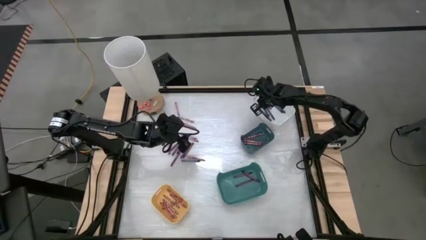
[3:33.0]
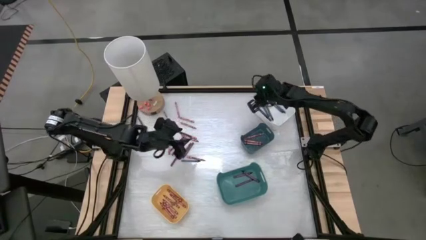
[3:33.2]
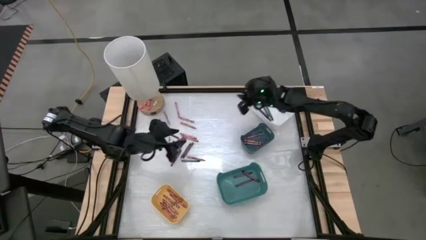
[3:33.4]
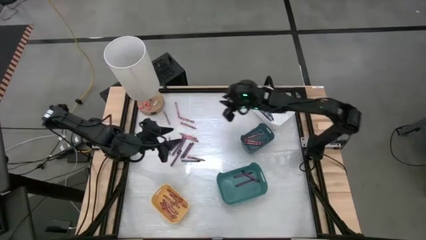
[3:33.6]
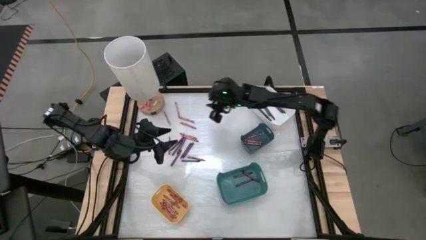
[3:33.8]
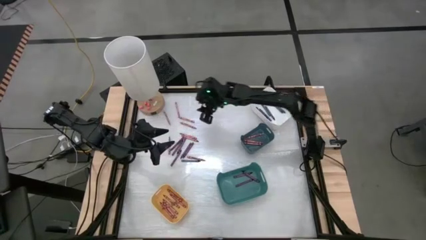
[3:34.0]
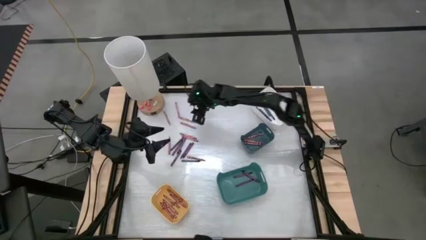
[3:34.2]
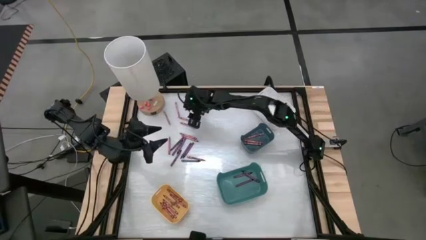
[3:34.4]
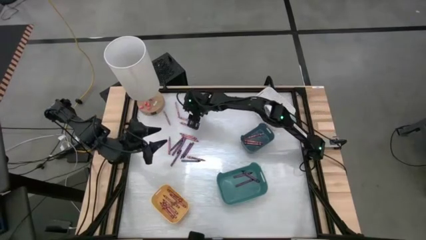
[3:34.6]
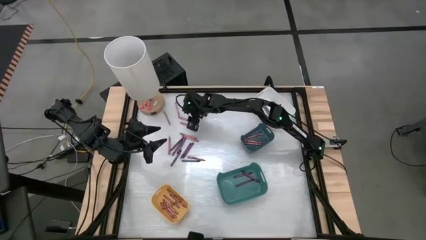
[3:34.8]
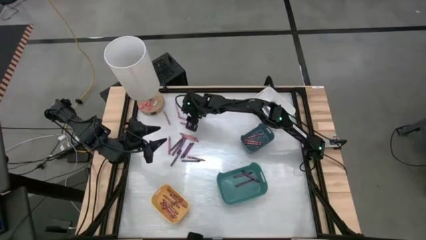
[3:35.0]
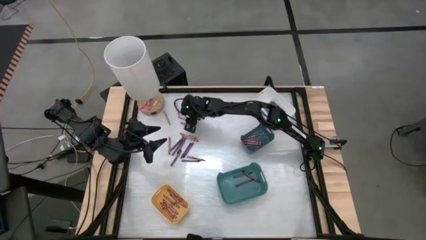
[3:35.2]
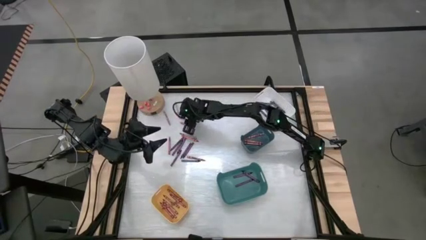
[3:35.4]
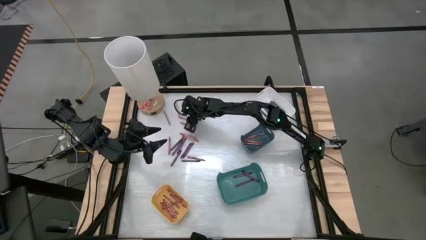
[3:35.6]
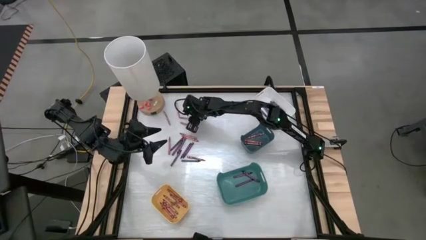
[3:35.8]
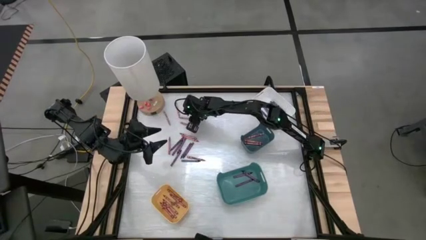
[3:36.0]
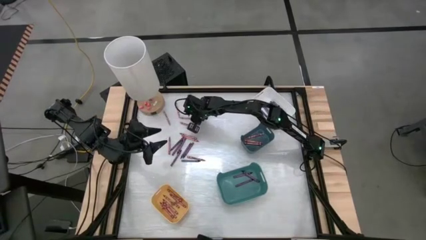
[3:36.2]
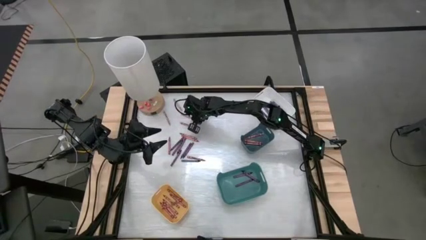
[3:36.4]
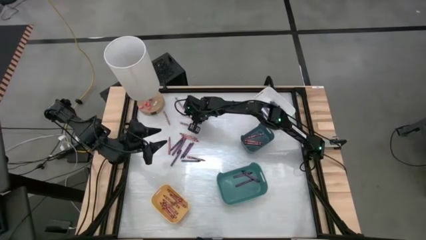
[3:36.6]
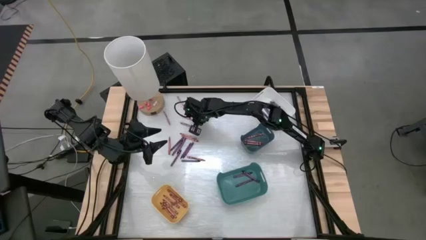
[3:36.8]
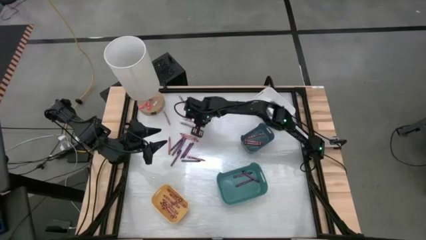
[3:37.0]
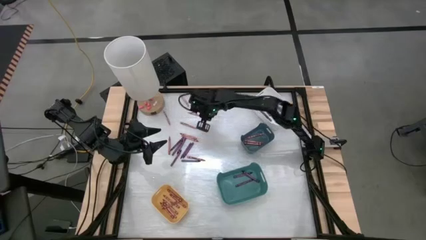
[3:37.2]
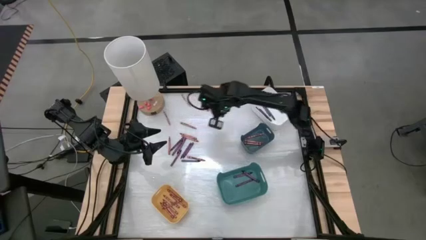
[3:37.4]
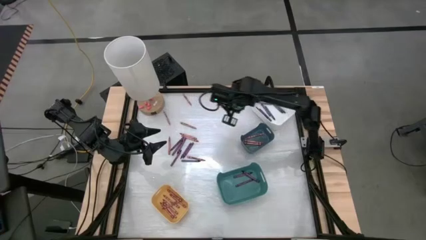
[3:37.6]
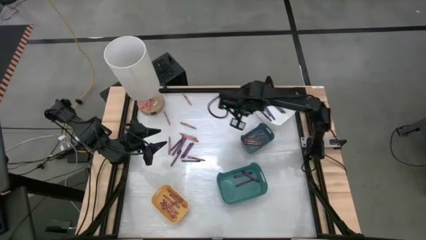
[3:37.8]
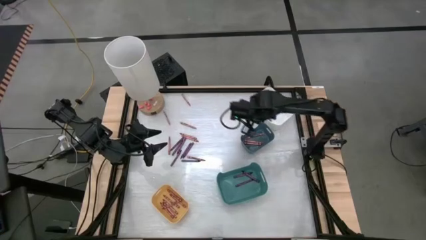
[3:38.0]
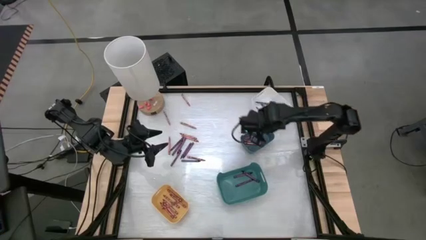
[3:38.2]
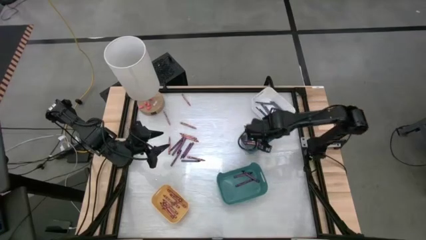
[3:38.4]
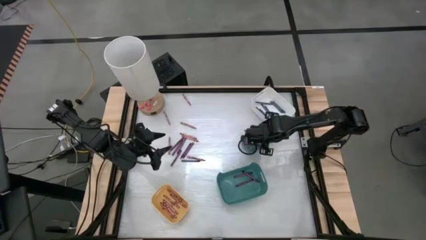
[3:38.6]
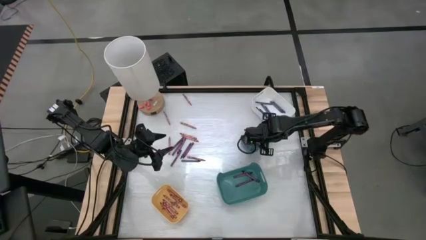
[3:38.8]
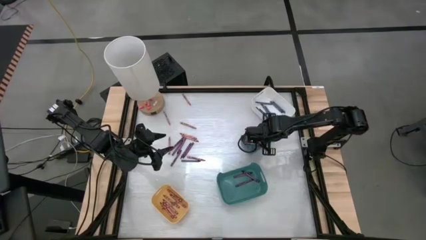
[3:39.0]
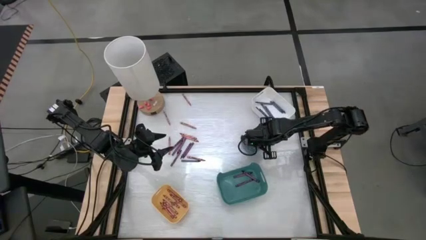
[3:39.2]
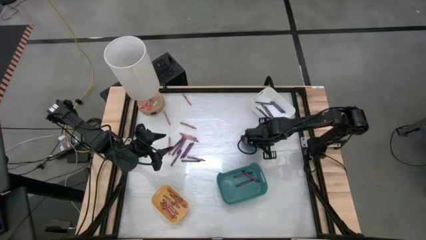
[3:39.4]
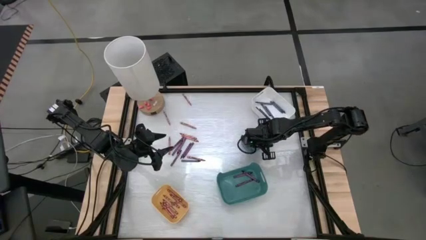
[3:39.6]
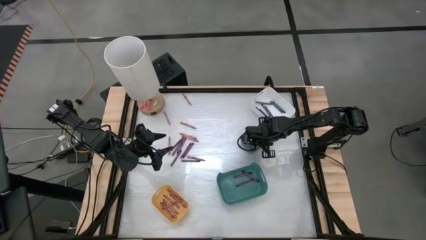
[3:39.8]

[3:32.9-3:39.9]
Task: Sort crayons
Put the pink crayon into the dark blue bin

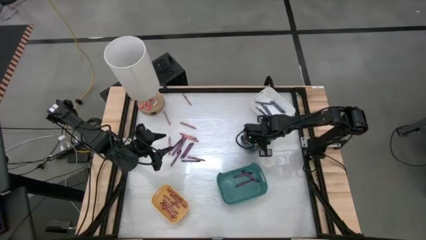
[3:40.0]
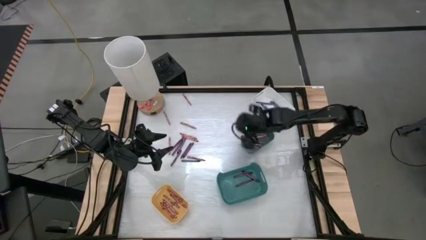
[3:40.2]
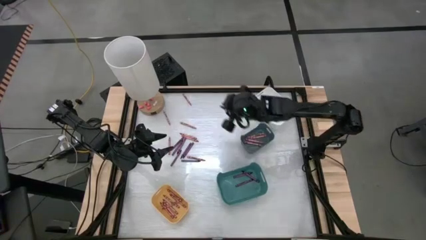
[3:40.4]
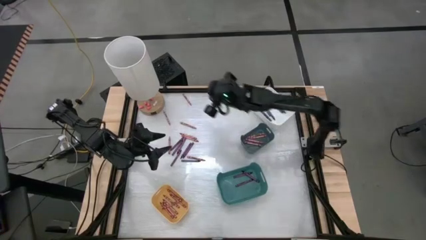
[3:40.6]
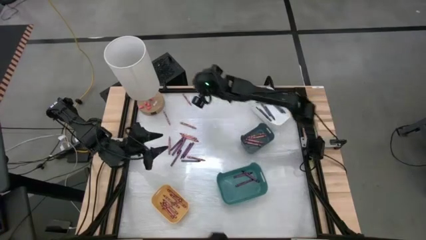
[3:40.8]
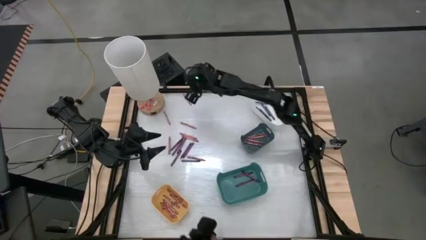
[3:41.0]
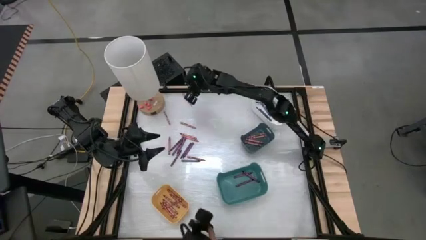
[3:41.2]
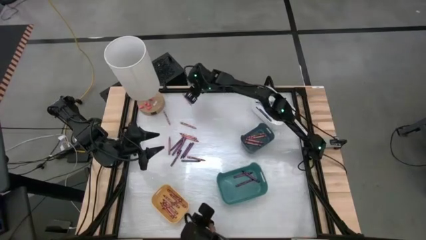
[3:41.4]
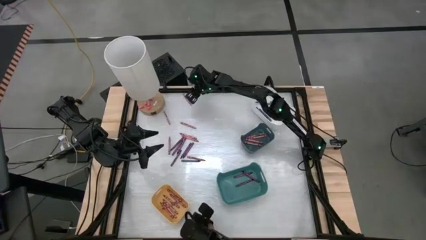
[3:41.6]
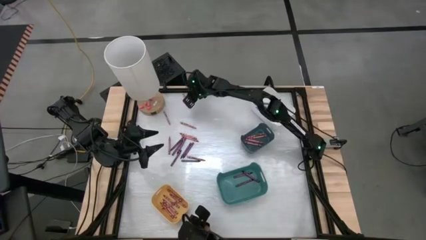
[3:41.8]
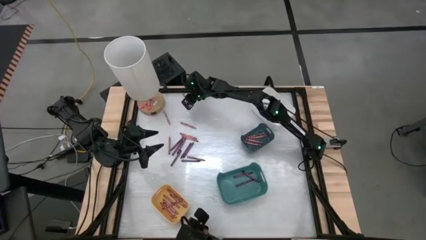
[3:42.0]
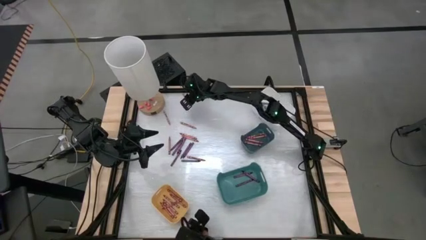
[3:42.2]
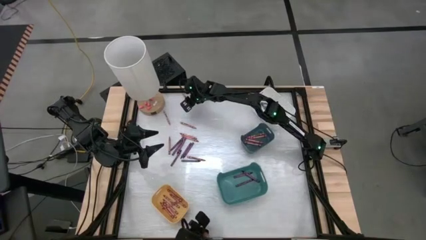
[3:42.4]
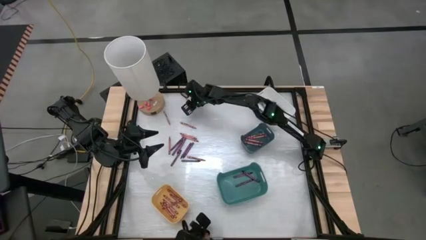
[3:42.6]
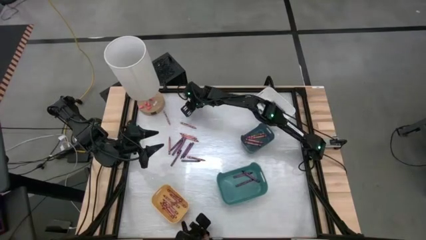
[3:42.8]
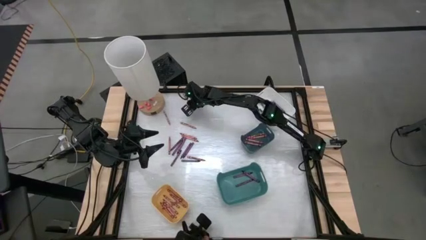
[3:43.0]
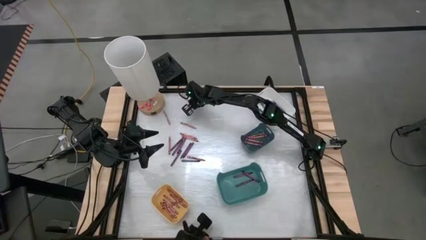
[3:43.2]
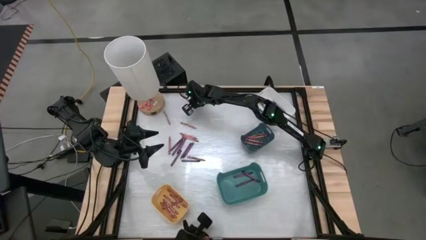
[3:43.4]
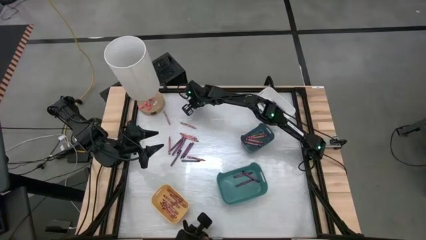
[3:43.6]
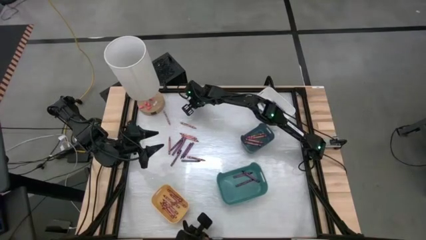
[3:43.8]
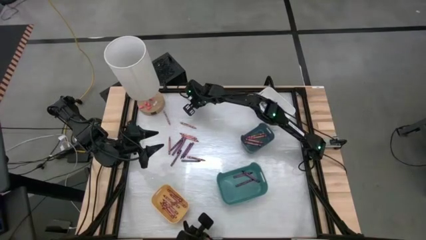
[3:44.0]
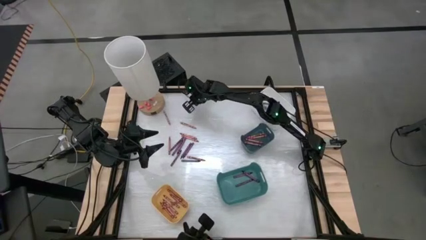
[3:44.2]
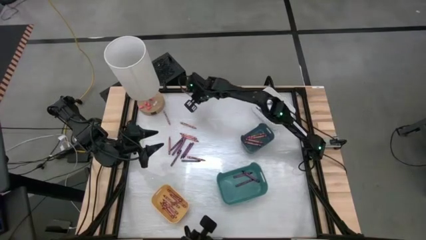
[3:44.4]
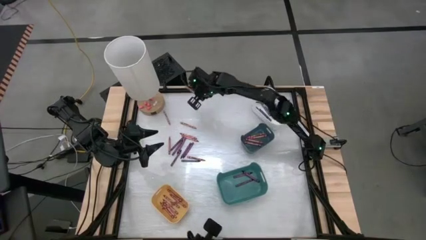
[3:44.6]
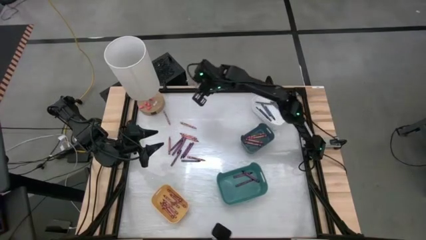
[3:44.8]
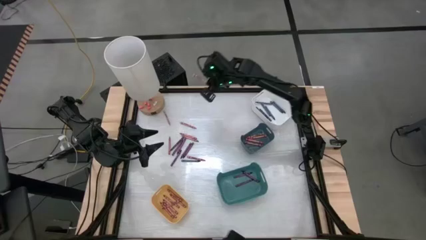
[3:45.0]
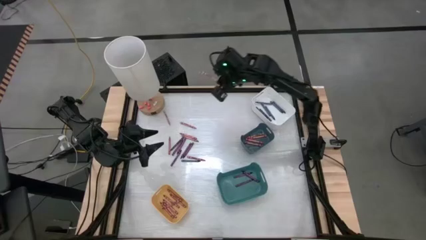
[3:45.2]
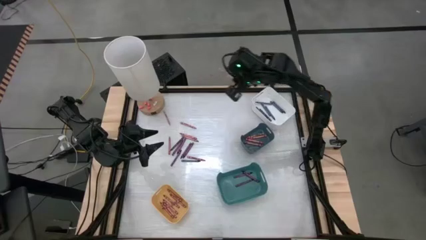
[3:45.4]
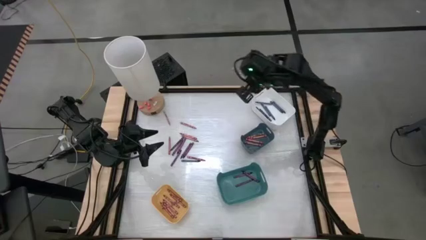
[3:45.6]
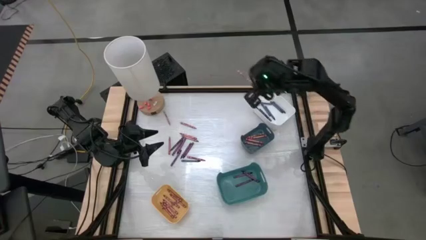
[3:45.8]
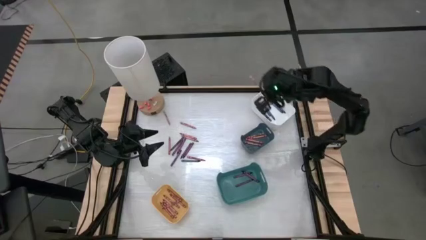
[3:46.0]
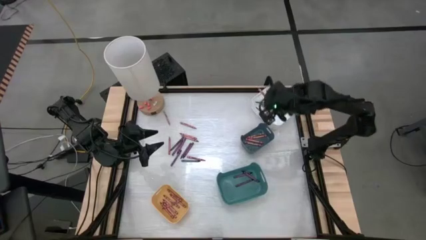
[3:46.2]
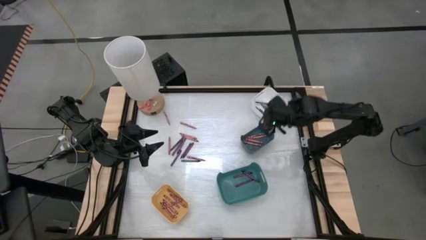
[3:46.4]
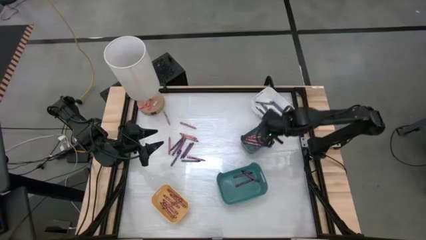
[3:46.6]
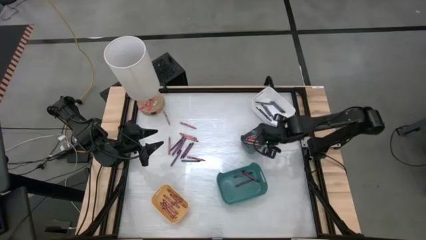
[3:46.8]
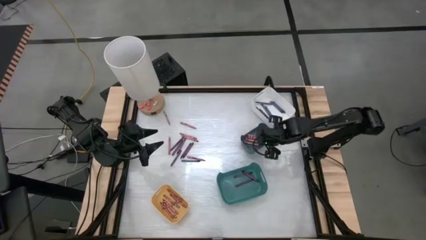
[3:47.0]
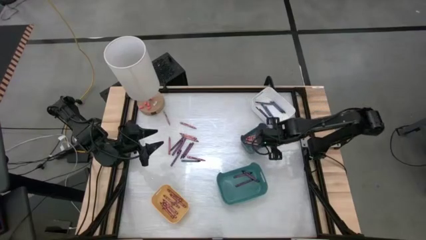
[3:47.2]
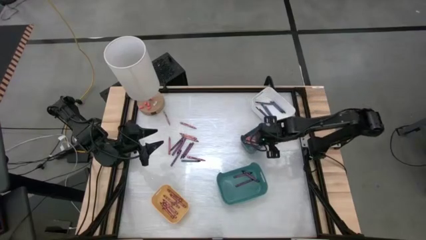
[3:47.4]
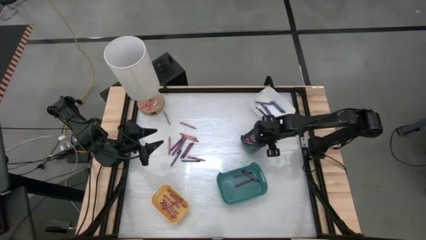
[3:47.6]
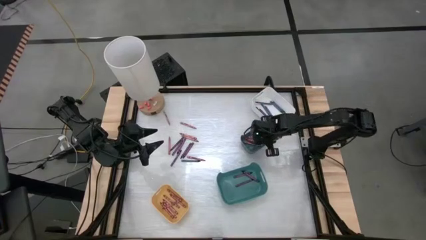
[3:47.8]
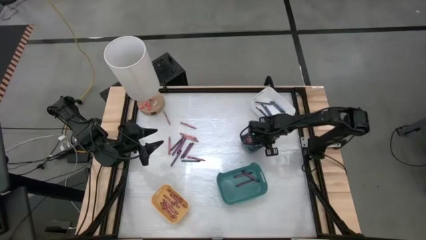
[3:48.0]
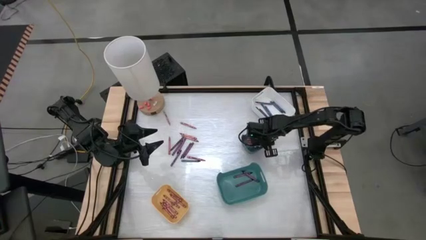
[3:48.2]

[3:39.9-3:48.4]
Put the pink crayon into the dark blue bin

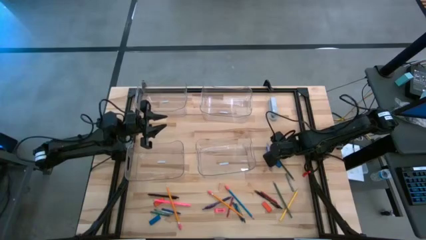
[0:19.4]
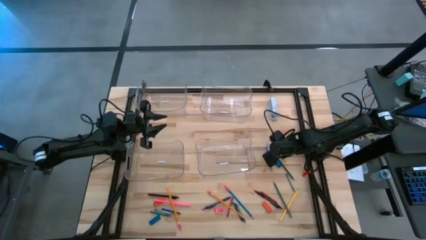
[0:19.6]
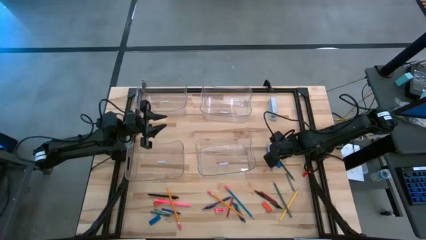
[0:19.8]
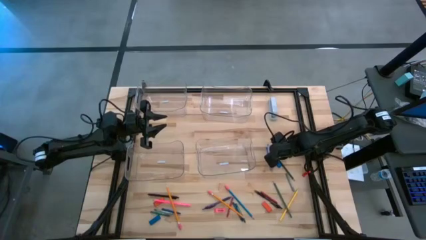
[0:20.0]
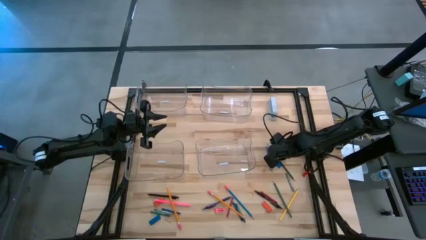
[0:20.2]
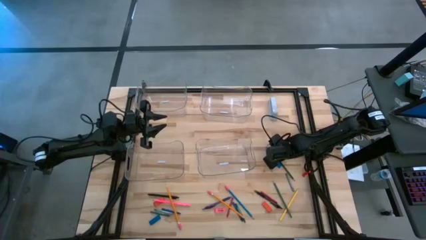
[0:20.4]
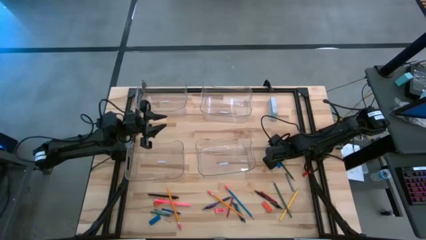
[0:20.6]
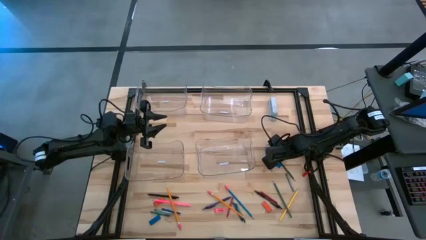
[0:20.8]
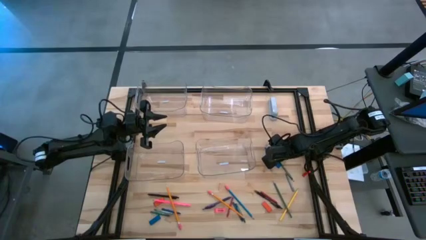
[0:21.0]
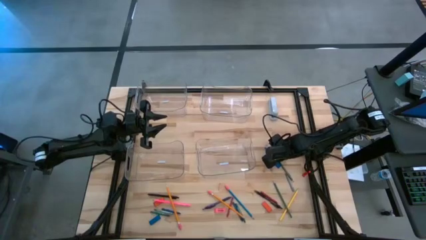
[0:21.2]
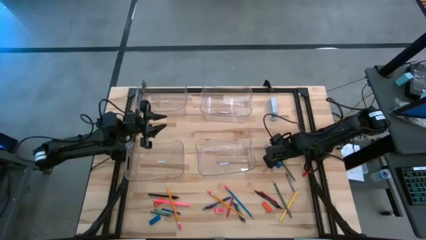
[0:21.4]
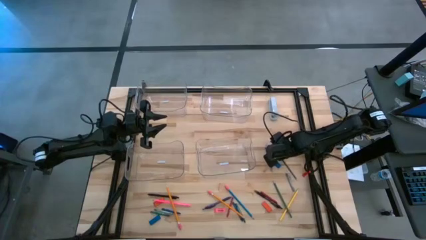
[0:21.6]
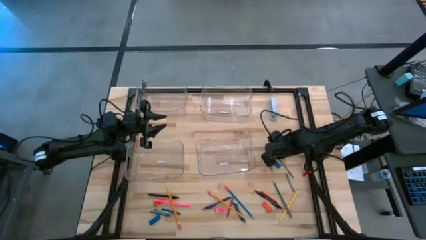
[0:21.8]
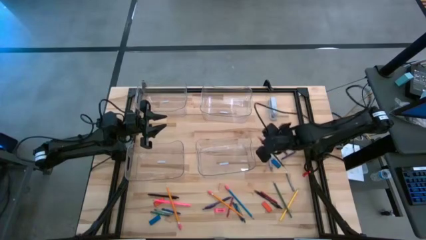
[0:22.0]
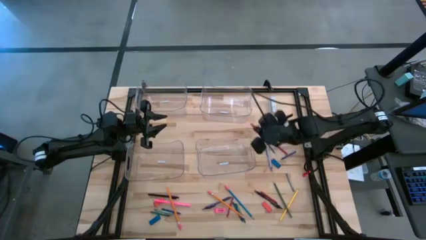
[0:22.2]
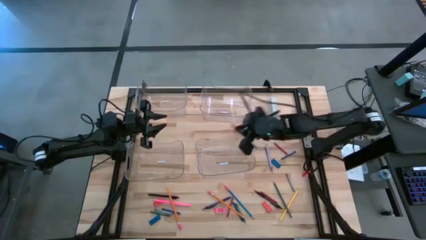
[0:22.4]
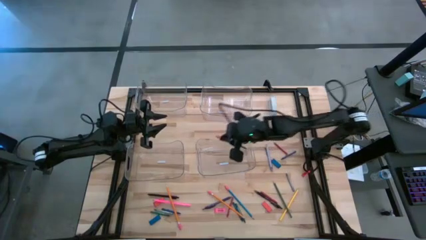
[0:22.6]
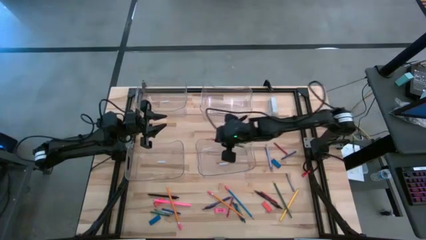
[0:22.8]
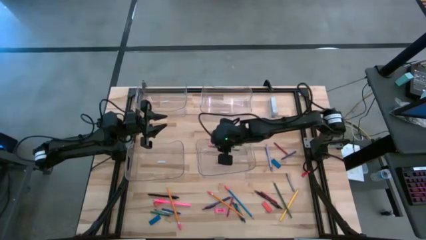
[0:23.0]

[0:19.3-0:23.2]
Task: Sort crayons/erasers/pens/pencils in bins
Put the dark green pencil into the bottom right transparent bin
